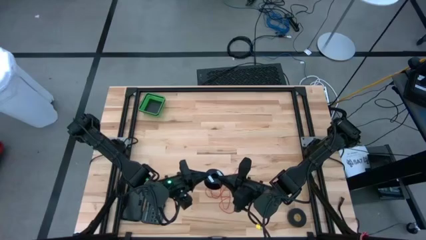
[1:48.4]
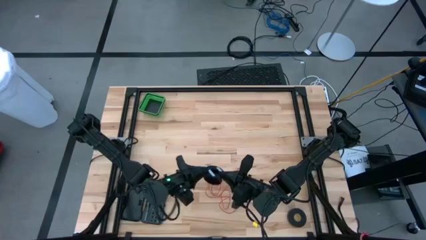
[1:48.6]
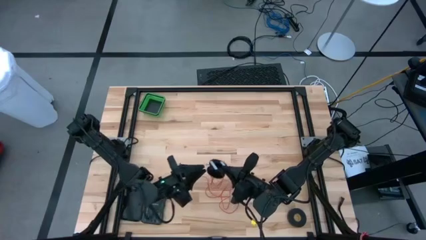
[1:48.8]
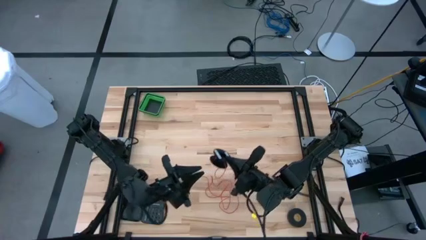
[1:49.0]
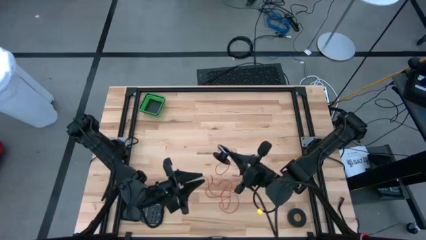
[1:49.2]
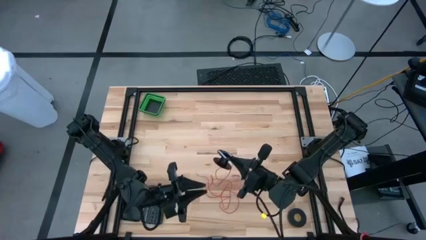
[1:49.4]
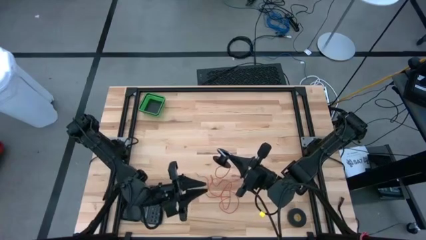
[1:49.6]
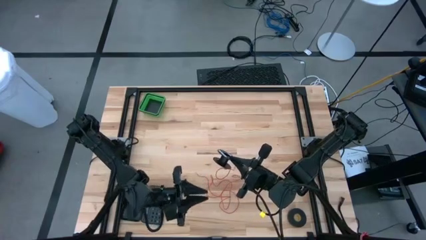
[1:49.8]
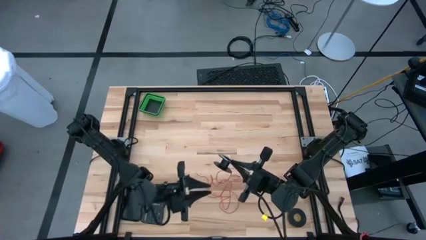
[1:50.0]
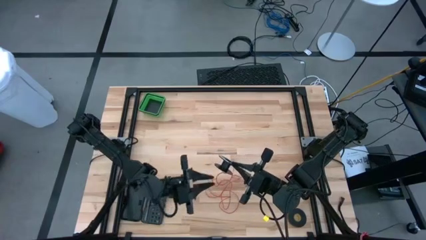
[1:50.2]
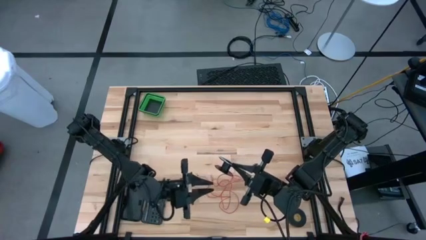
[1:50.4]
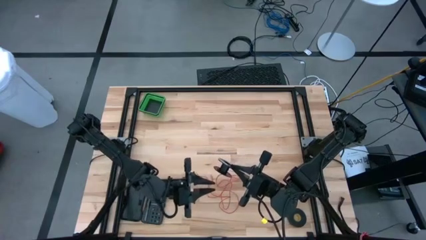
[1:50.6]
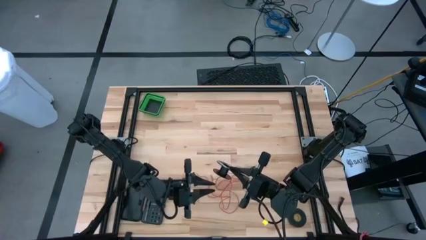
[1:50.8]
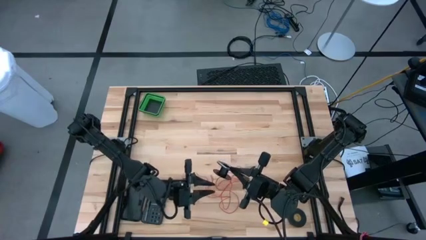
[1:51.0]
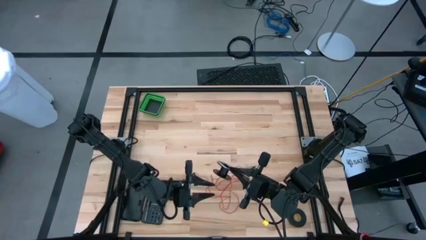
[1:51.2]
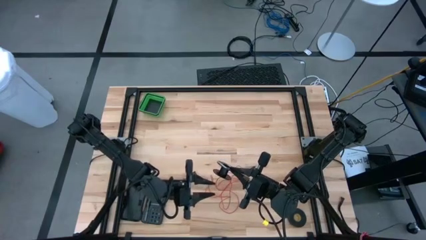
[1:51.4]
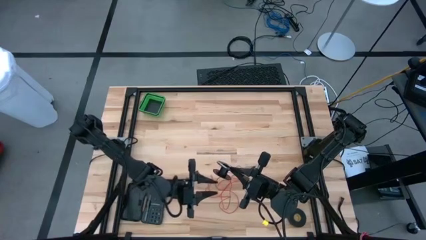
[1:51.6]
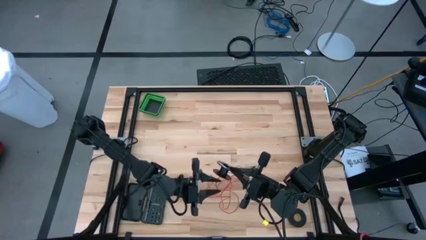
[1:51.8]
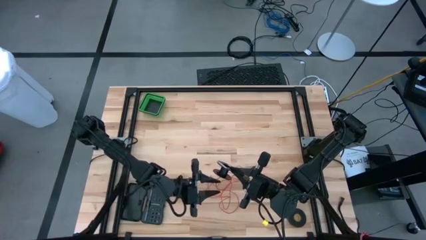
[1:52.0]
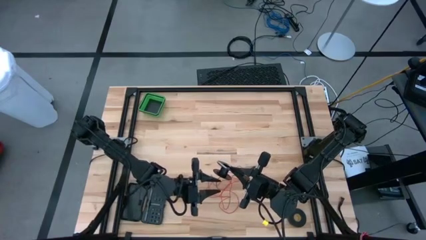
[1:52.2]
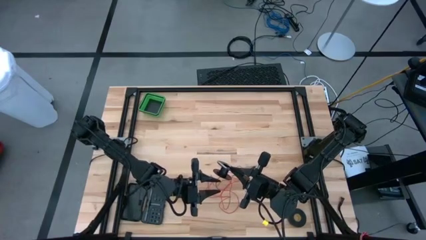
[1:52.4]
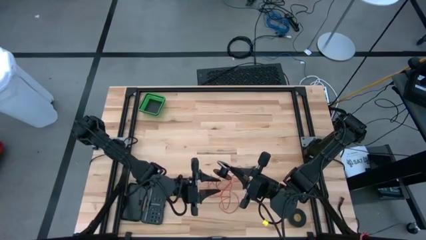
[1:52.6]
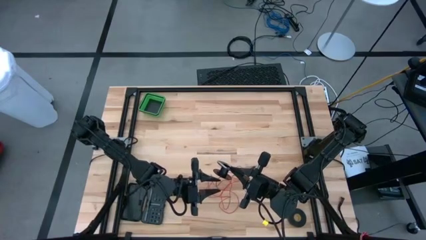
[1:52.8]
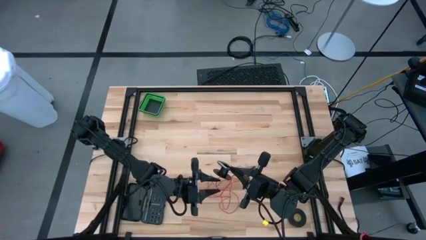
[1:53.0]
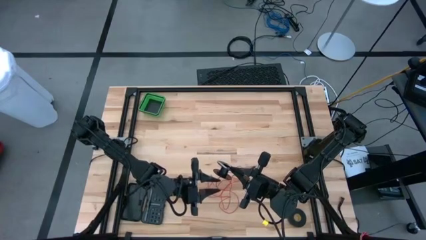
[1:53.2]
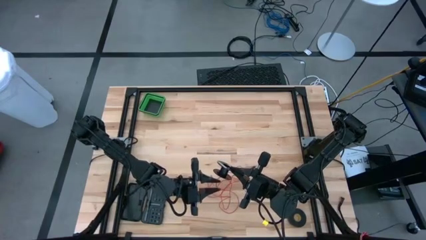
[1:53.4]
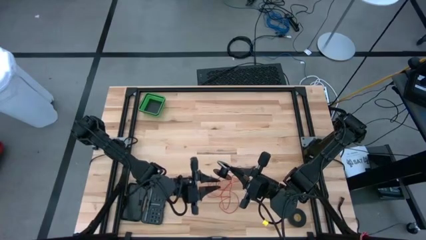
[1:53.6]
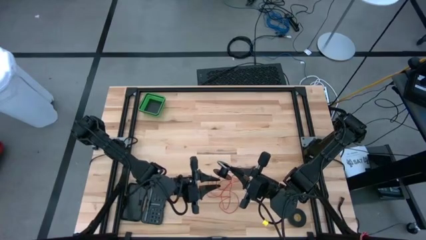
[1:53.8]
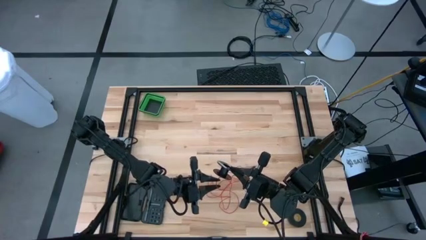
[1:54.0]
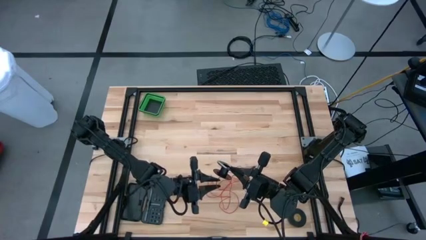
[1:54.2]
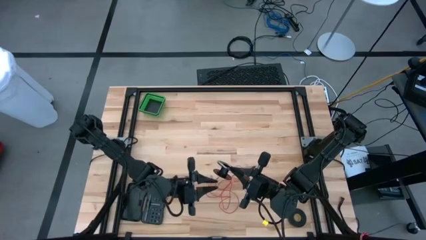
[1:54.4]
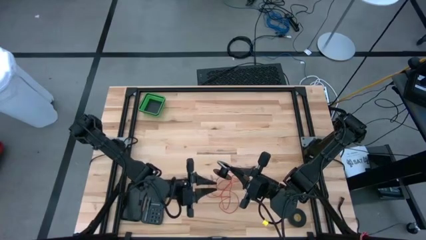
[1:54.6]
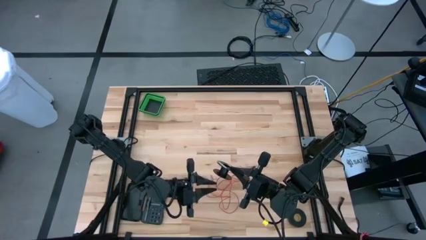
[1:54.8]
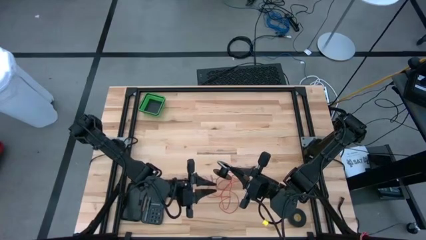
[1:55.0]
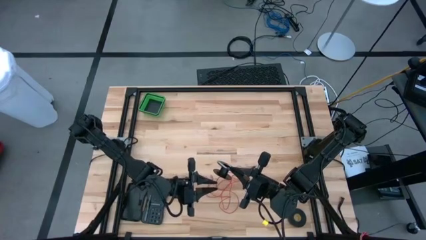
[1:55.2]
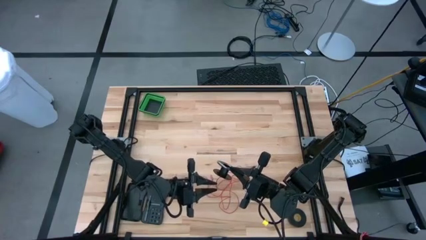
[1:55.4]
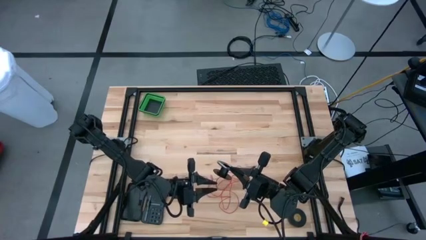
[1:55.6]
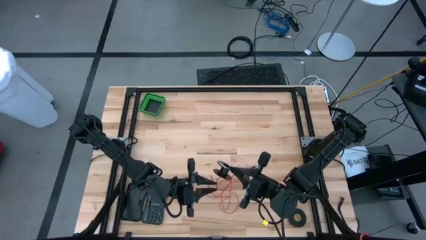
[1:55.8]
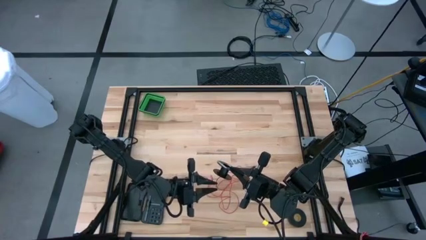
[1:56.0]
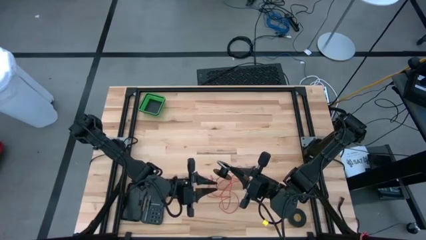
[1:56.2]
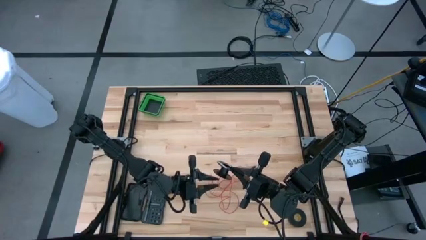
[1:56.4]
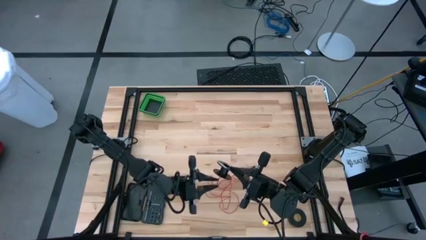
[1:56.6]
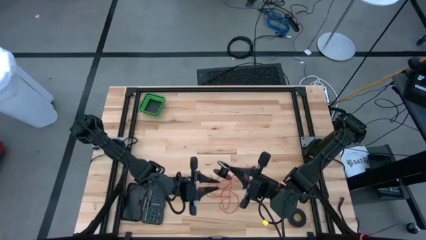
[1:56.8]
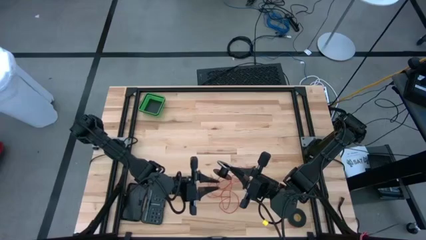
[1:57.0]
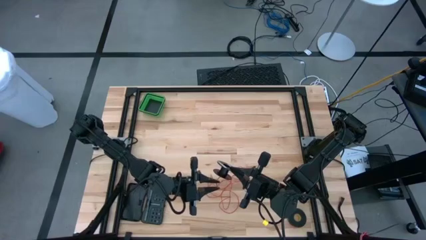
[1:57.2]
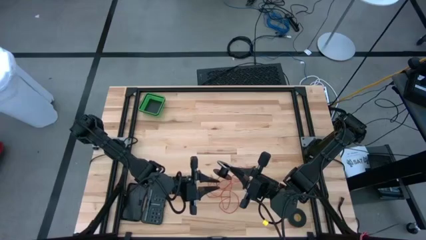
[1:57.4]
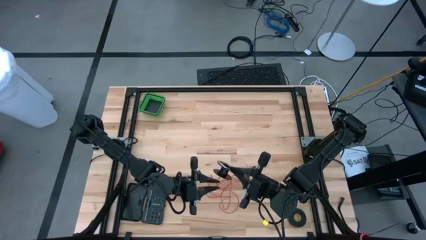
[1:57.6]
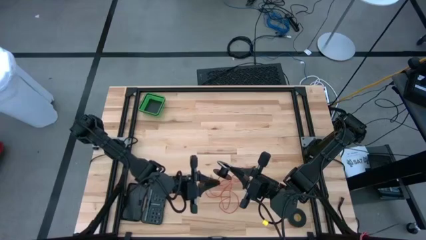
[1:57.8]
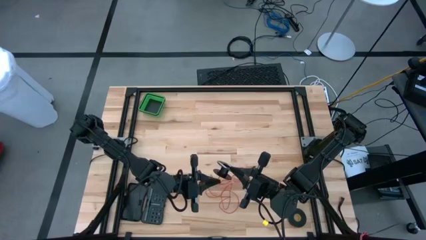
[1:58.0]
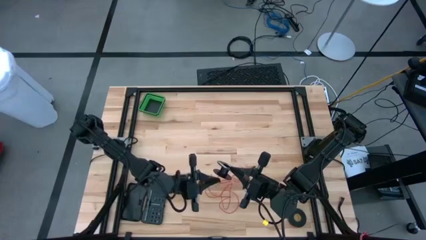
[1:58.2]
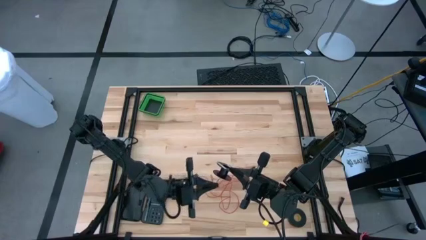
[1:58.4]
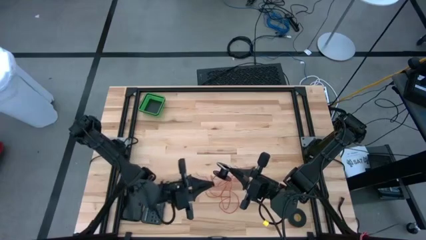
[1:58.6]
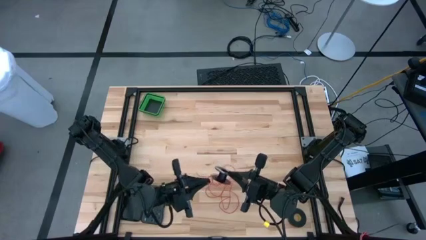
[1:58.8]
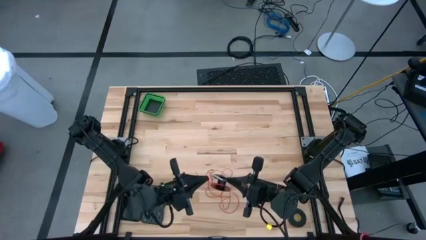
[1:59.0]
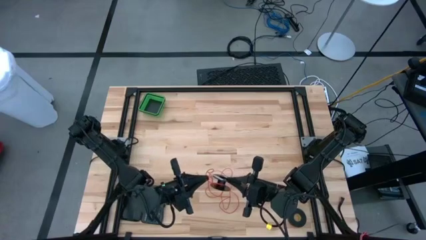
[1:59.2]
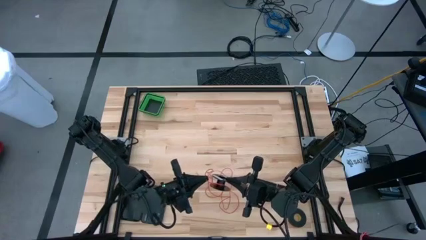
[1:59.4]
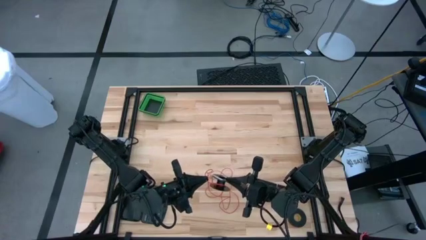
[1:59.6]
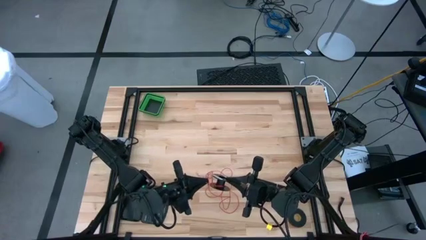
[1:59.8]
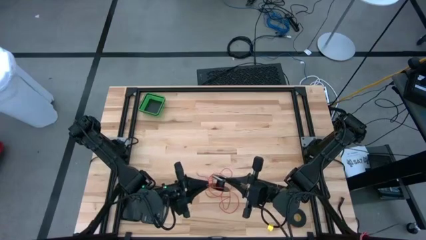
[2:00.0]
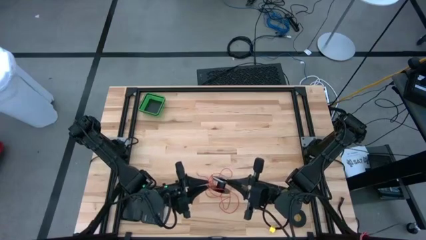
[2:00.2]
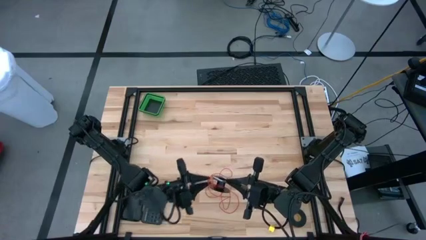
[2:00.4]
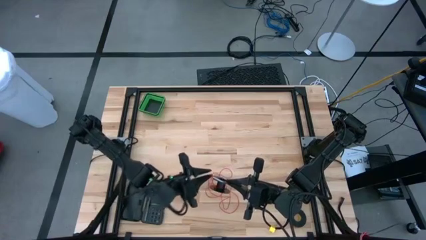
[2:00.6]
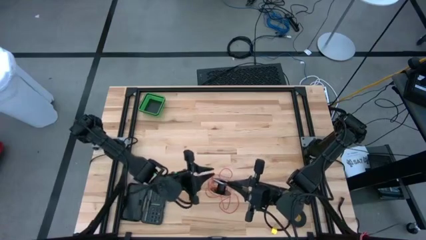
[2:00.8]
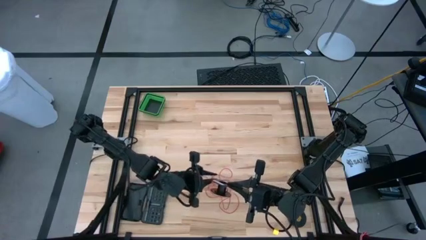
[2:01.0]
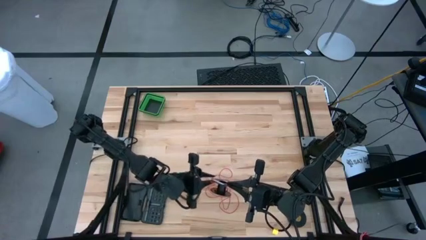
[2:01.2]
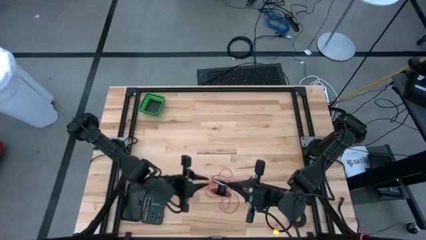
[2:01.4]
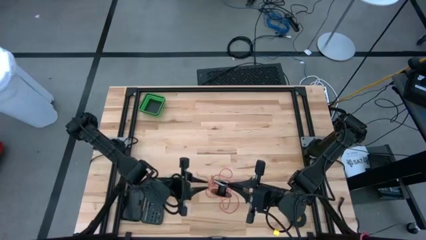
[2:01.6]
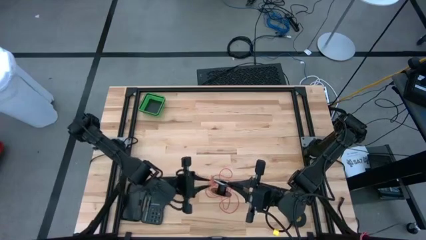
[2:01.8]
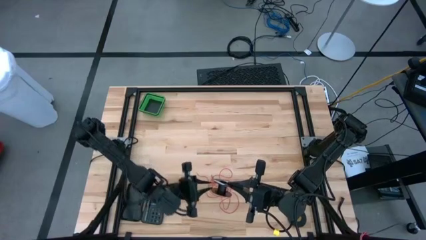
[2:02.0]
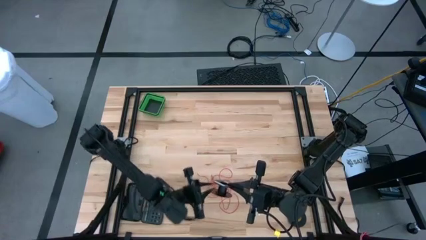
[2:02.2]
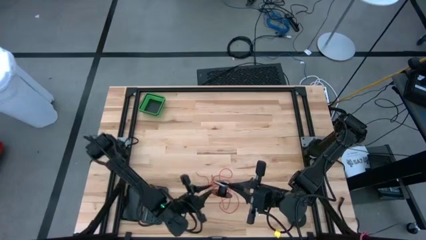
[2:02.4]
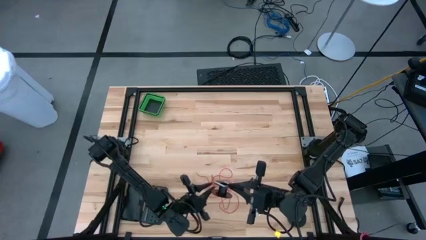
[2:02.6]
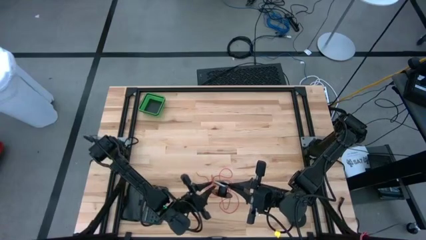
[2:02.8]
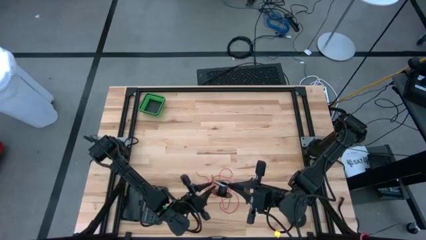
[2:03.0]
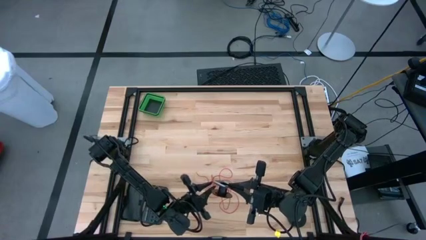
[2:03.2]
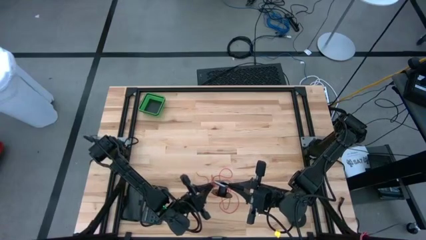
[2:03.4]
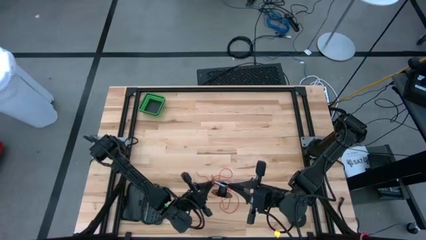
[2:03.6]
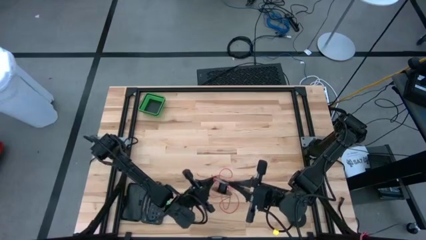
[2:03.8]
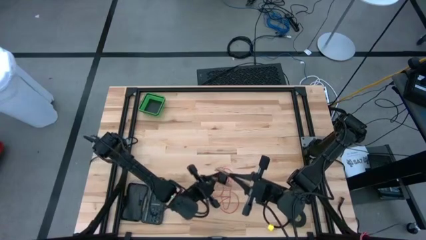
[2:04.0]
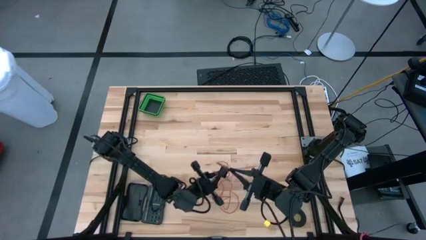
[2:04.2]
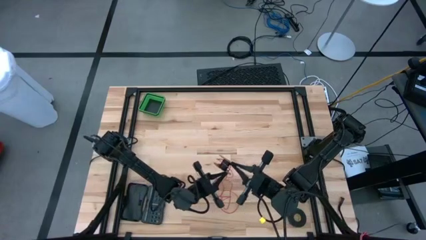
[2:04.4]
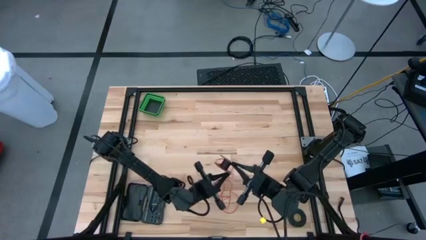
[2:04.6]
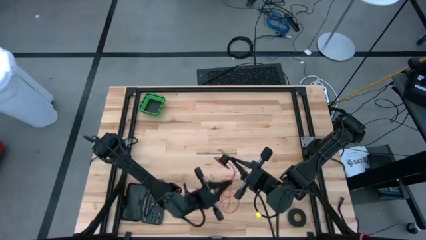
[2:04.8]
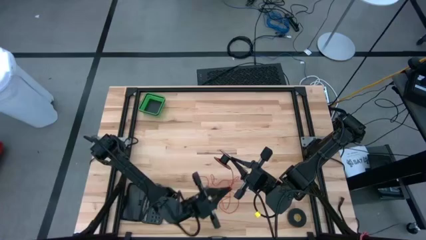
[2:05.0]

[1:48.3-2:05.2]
Task: Coil cords
Coil the red wire into the spool
